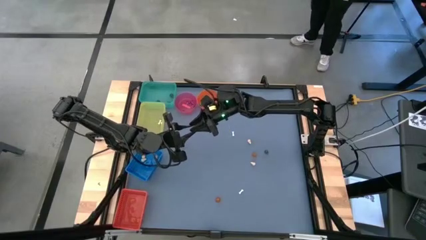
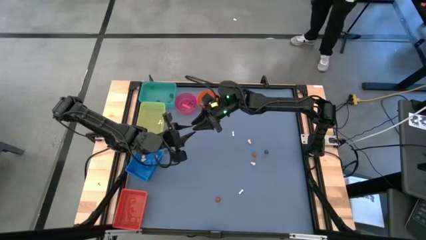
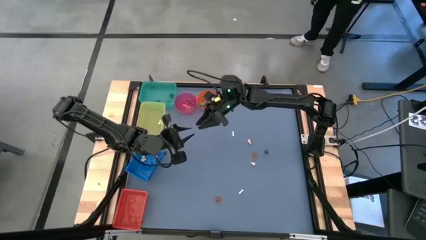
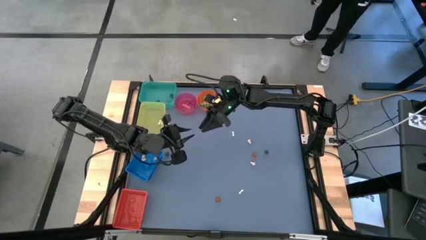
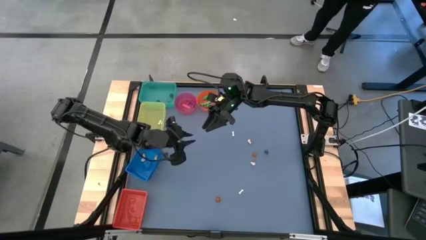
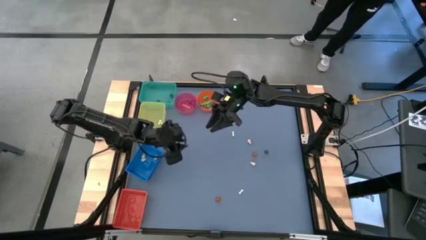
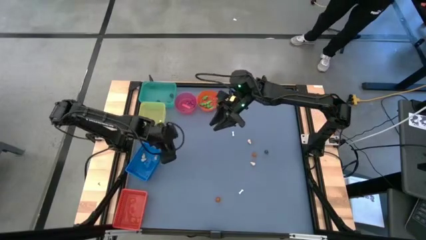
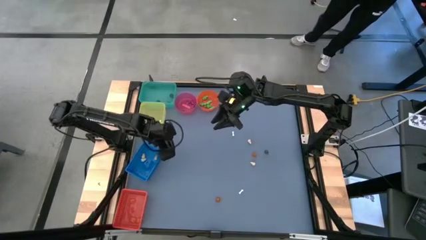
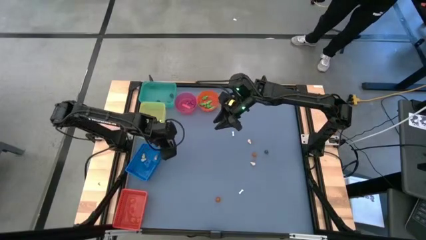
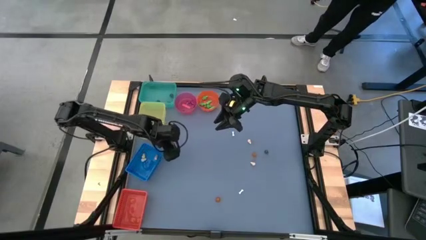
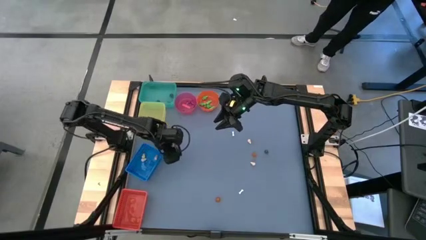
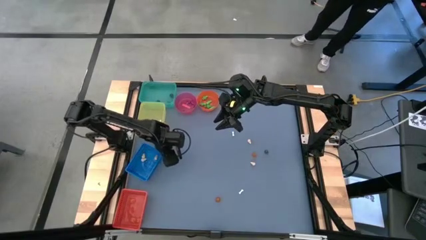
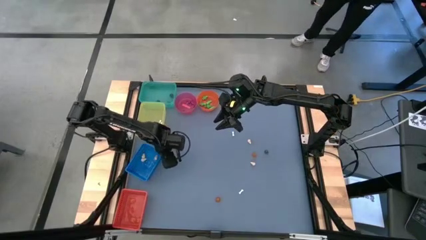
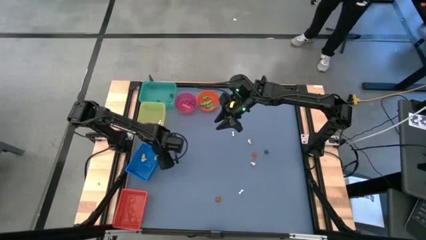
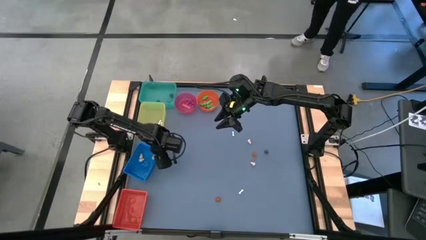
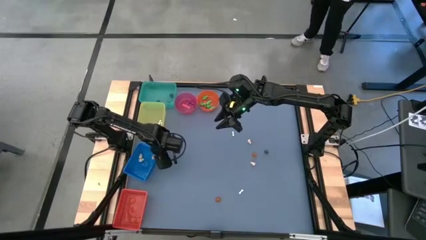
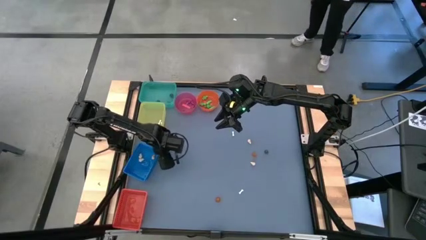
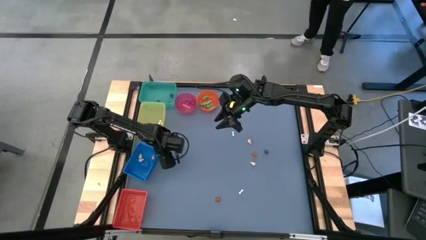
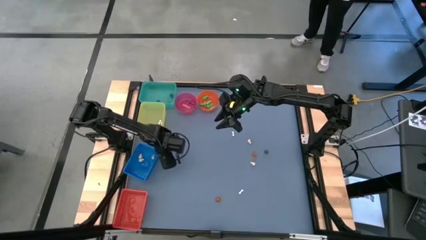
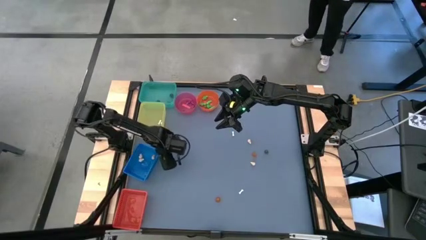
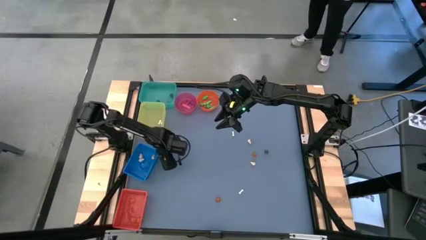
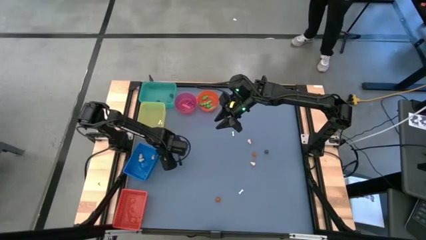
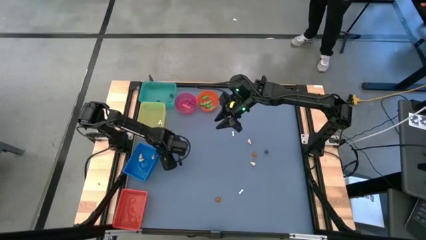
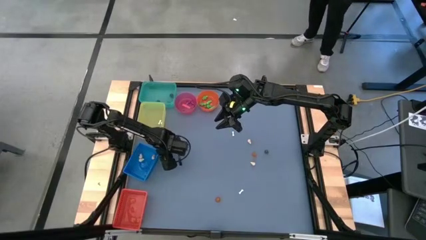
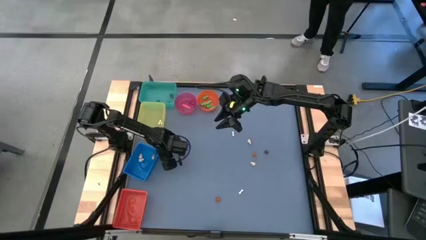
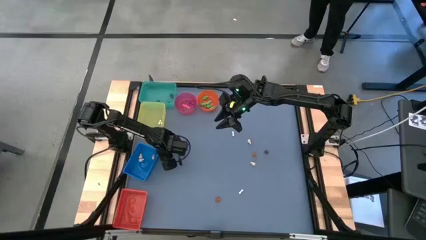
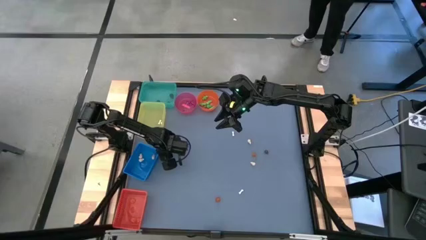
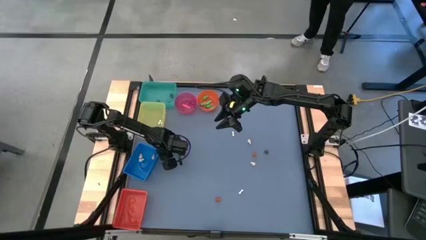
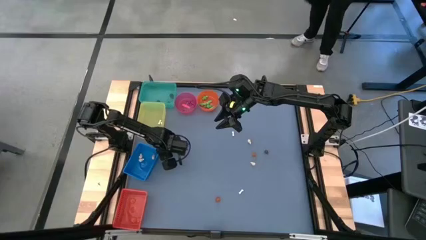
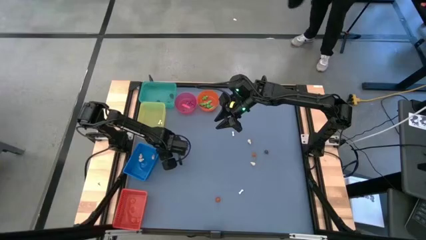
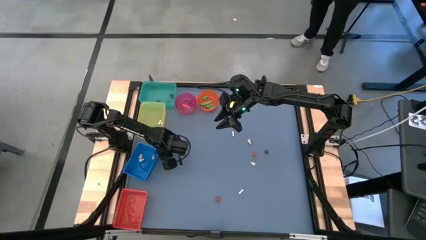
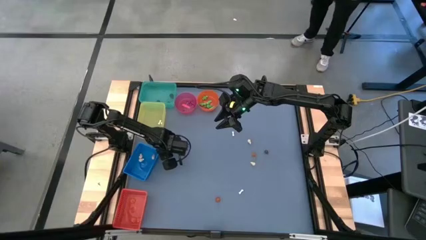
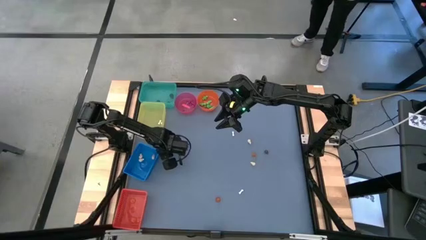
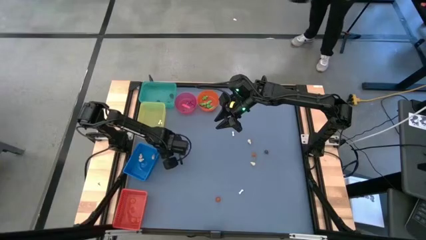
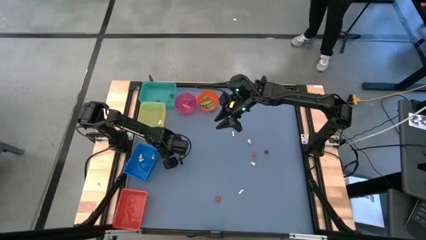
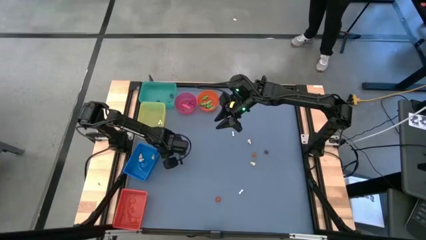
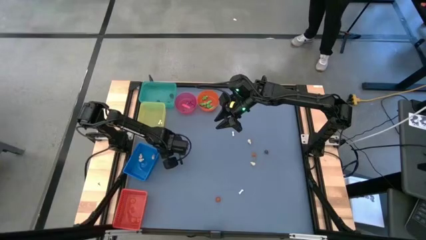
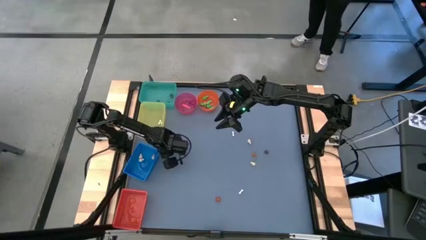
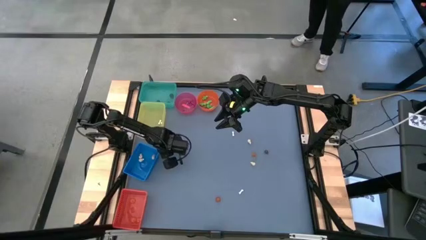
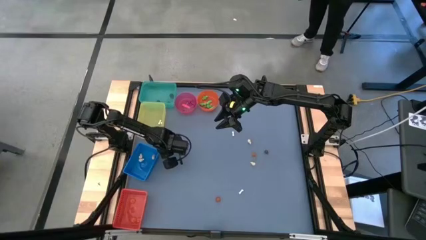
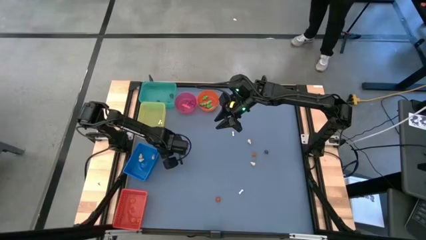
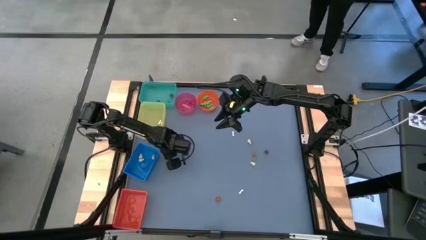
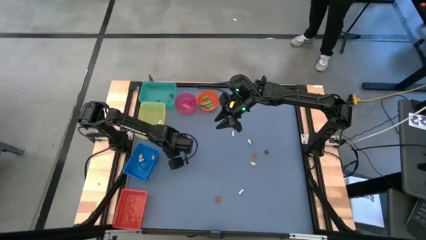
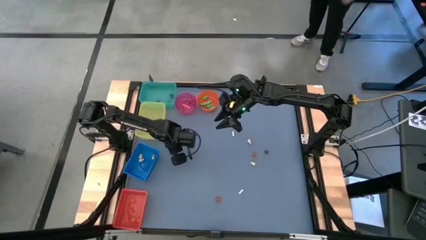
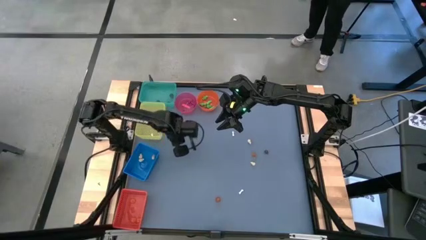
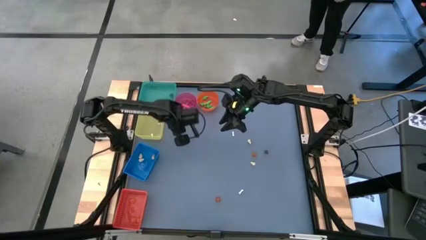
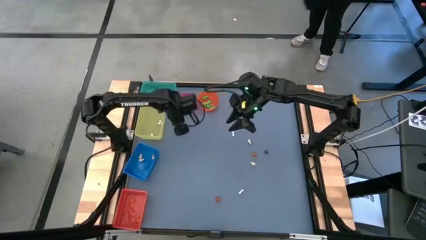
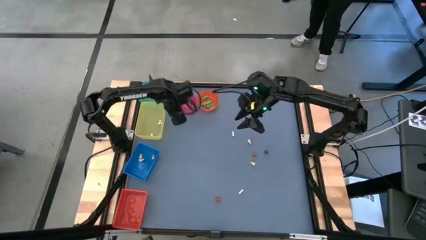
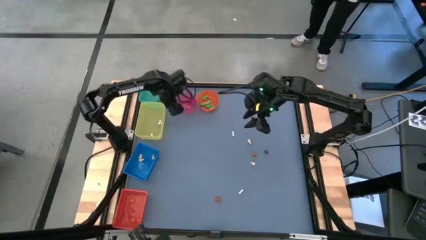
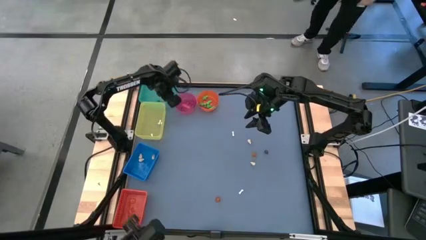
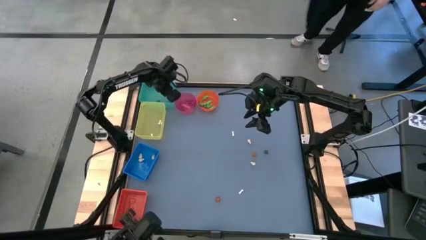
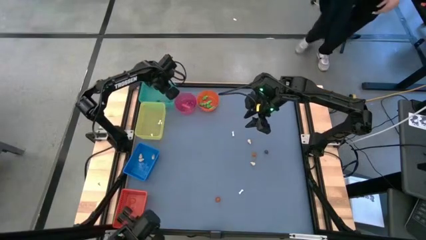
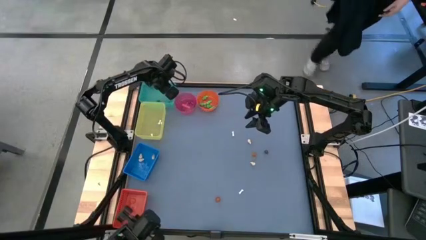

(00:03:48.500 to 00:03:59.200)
Task: Sort Halloween decoration
Put the black skull toy into the green bin
